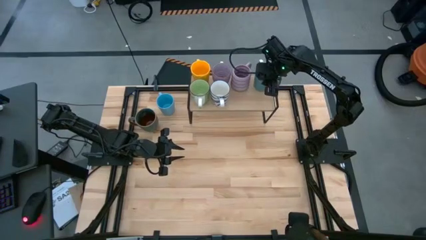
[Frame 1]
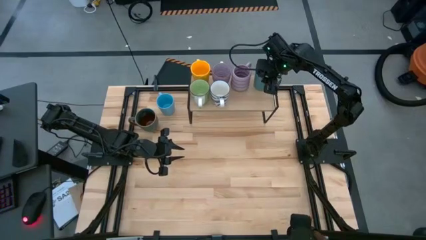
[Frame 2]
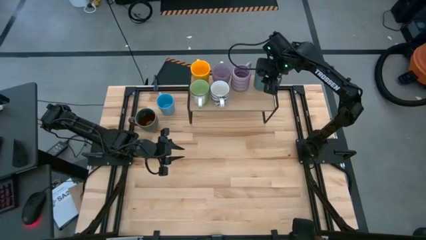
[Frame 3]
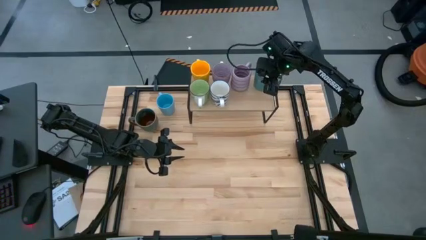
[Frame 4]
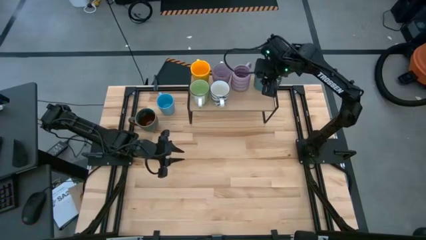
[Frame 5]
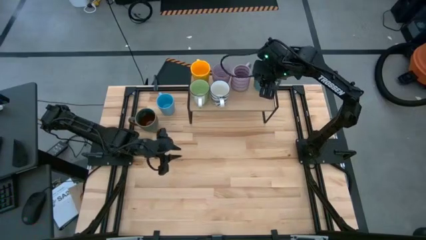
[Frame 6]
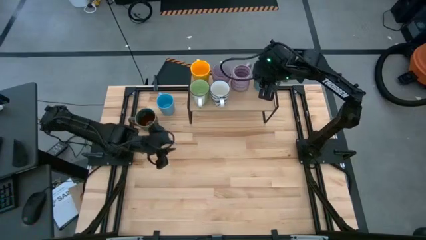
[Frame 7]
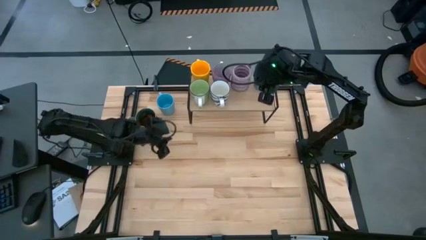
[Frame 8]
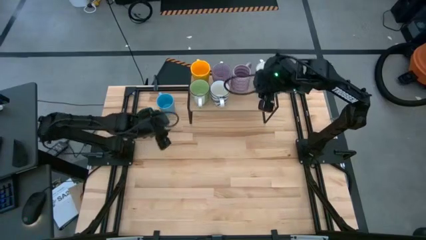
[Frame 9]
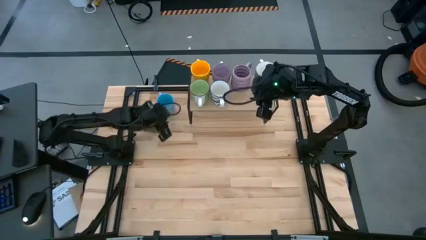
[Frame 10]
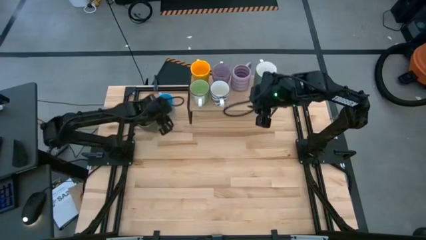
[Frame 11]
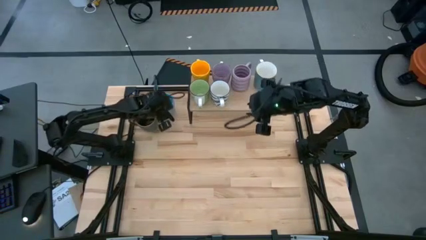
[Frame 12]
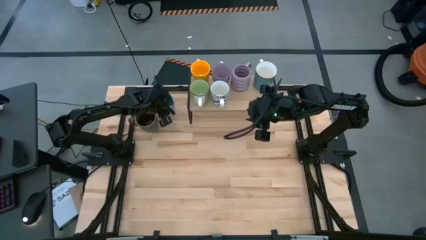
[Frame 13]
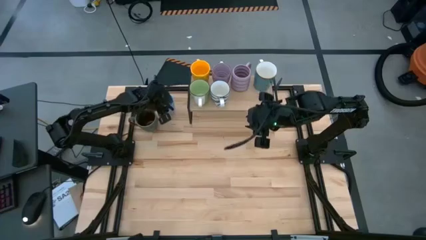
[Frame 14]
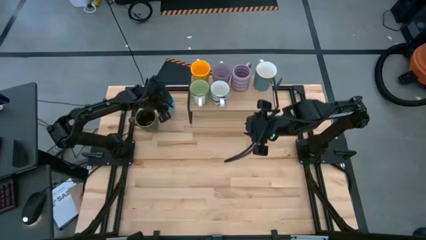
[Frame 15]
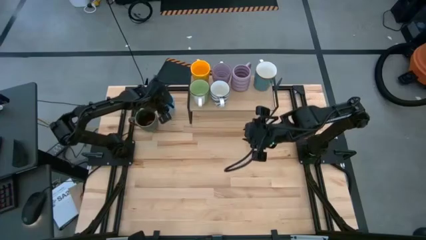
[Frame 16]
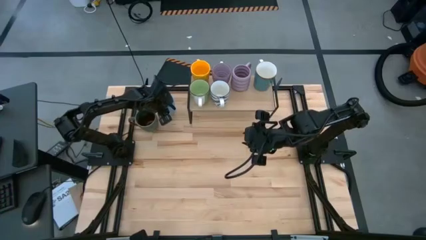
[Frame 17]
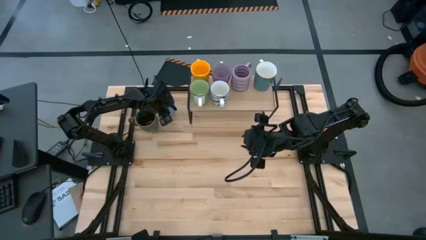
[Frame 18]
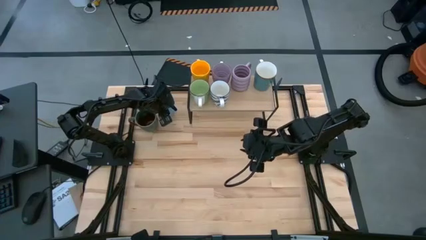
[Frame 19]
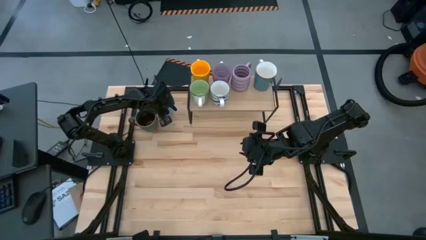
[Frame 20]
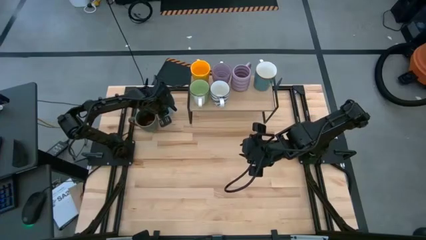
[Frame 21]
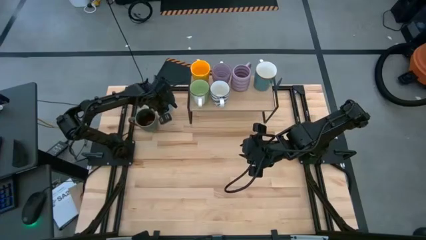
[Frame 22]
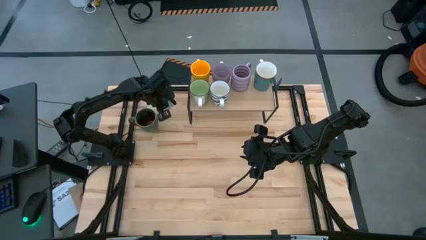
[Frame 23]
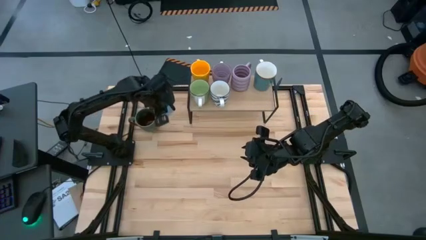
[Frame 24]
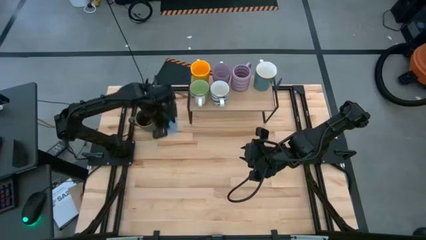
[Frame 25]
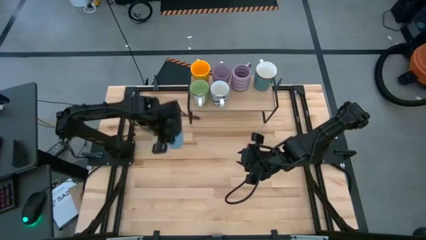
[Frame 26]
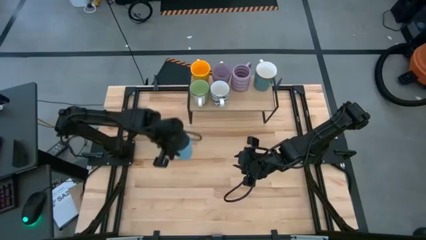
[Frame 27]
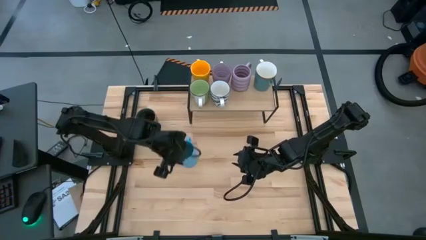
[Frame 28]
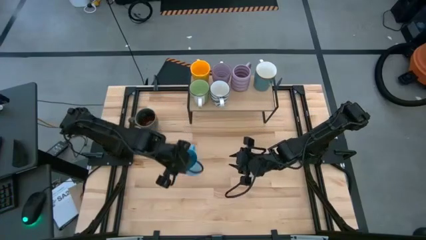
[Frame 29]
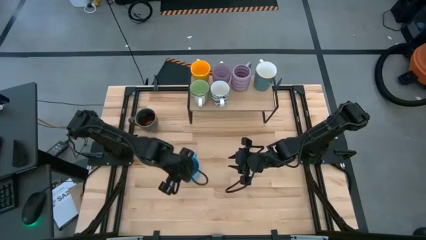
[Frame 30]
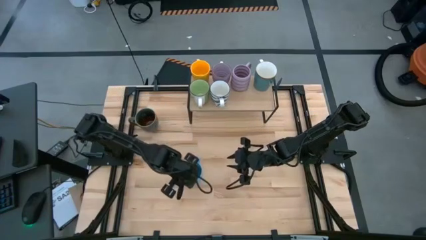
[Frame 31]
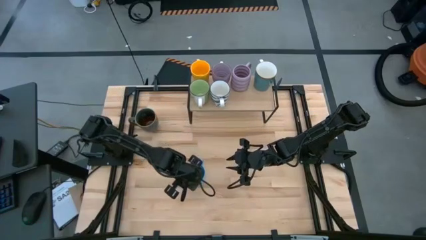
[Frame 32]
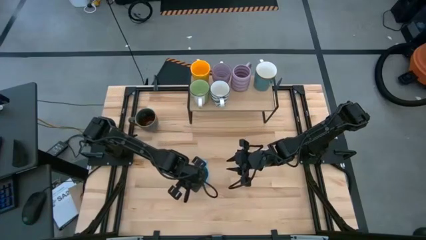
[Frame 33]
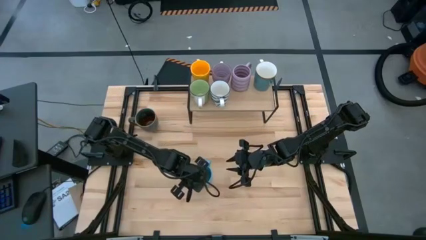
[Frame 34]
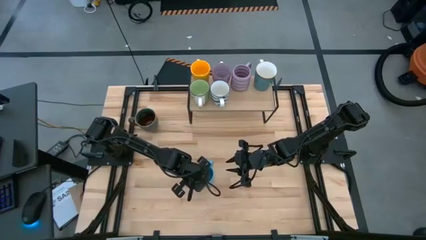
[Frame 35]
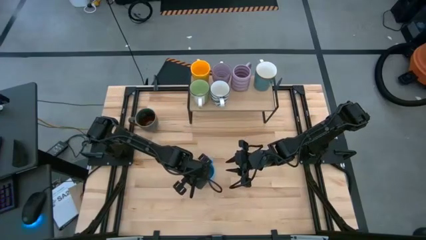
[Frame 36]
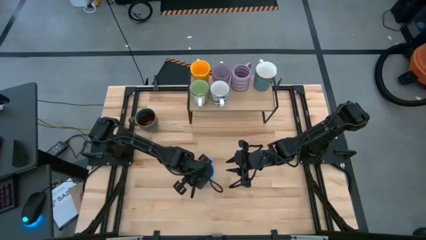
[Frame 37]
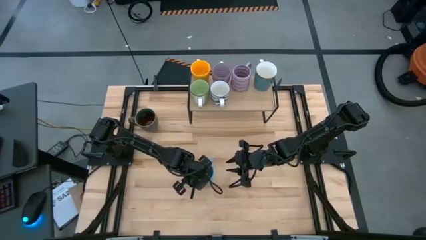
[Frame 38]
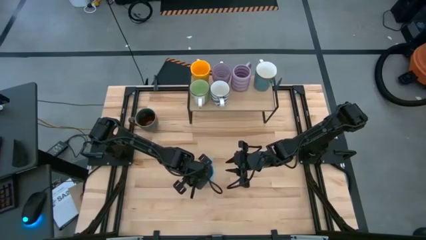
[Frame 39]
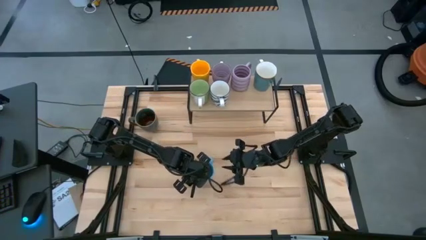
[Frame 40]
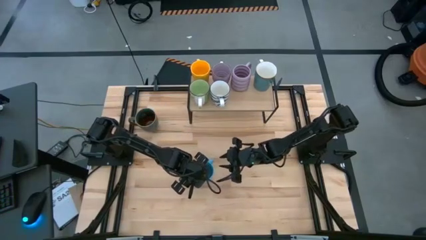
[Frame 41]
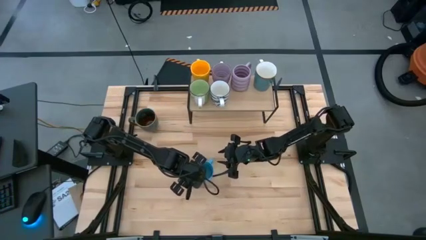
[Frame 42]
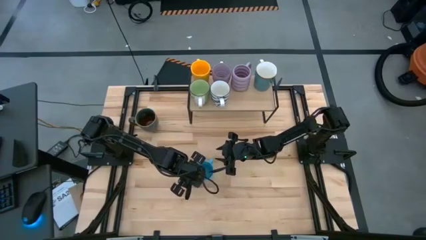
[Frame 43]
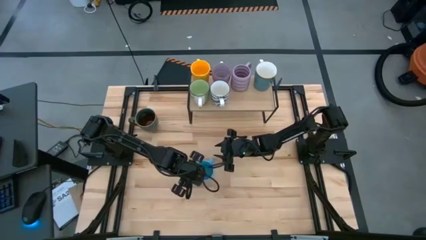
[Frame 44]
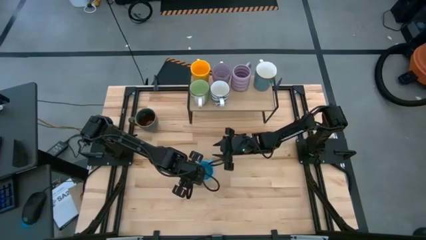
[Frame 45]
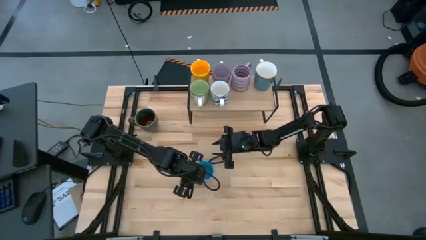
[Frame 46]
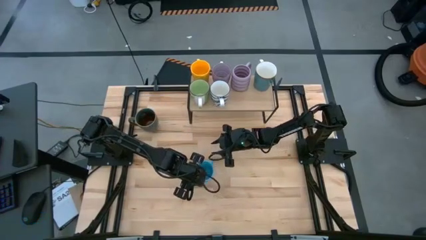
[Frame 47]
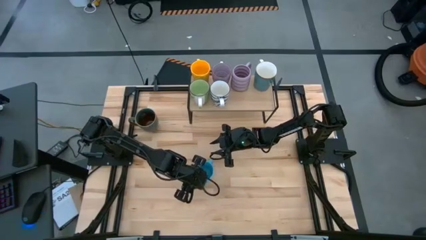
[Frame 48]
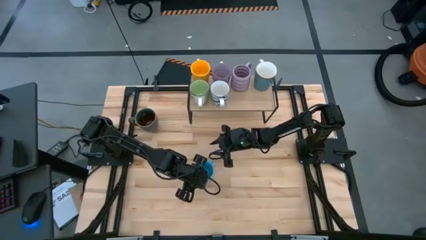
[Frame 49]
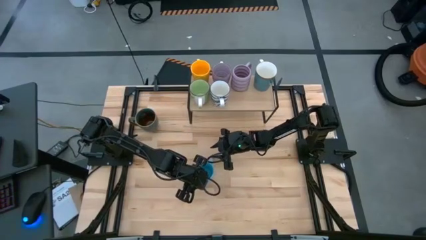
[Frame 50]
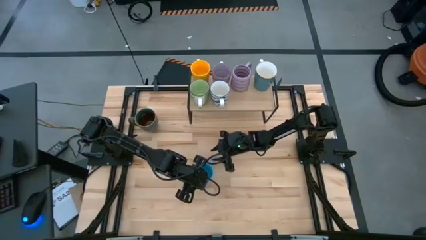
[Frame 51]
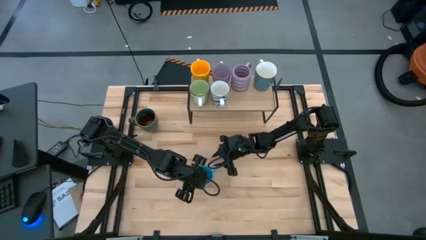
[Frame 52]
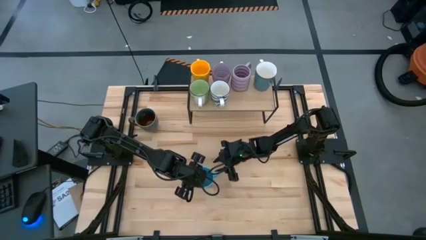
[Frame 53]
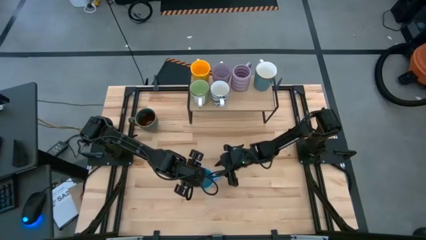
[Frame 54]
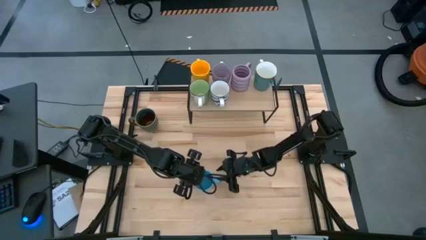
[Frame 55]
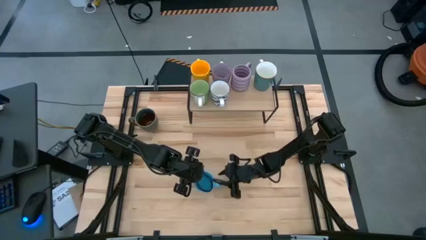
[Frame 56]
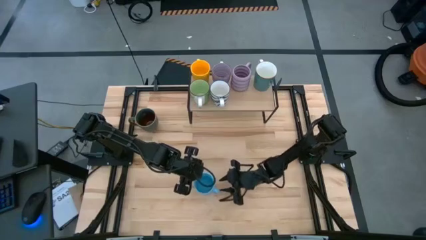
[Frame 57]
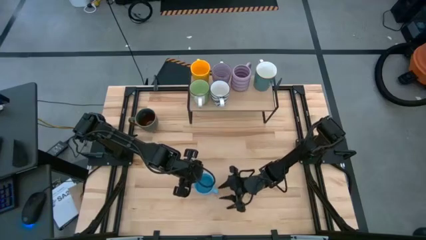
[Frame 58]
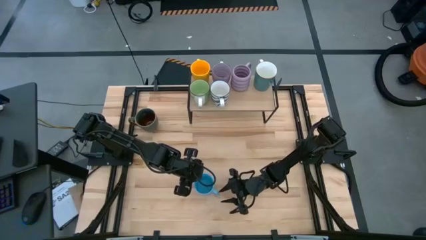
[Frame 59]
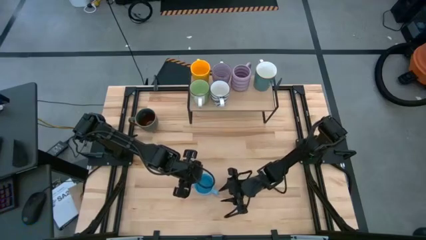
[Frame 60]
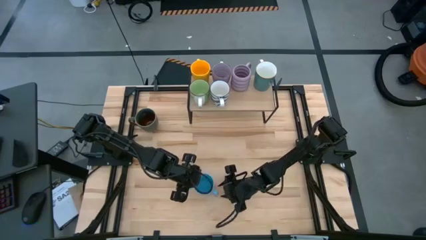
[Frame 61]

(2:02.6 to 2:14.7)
Task: Place coffee mugs
Put the light blue mug on the shelf
